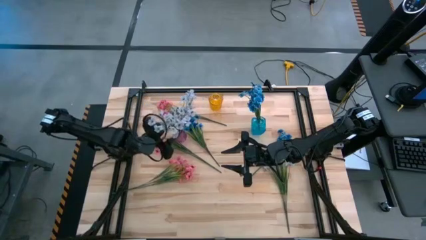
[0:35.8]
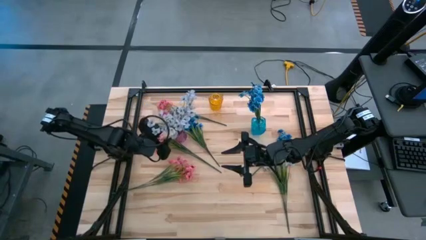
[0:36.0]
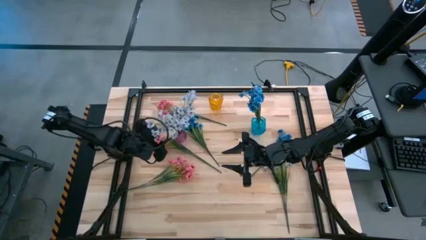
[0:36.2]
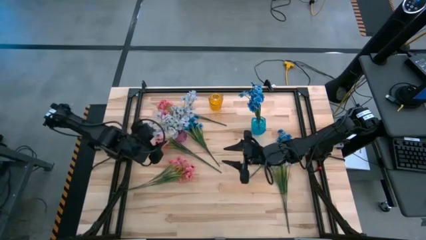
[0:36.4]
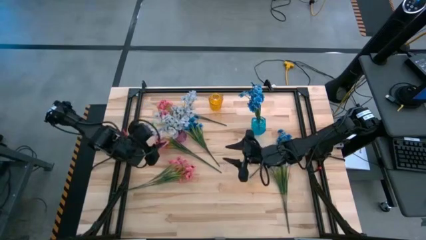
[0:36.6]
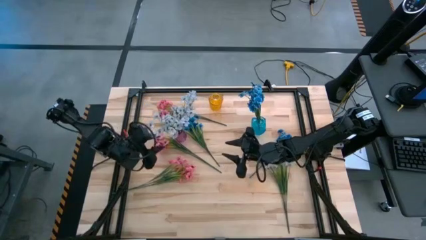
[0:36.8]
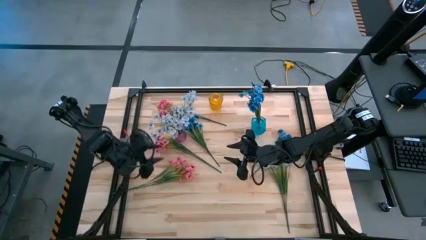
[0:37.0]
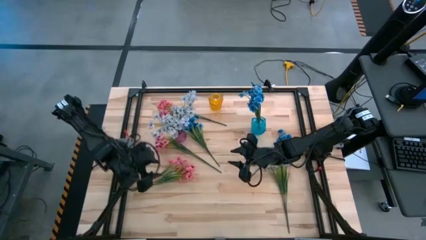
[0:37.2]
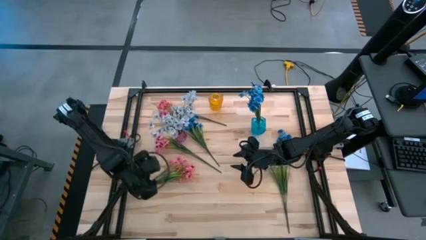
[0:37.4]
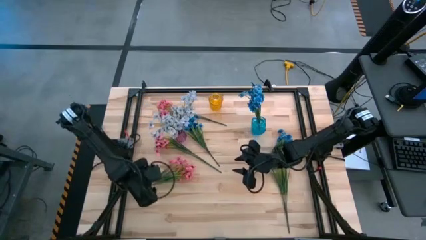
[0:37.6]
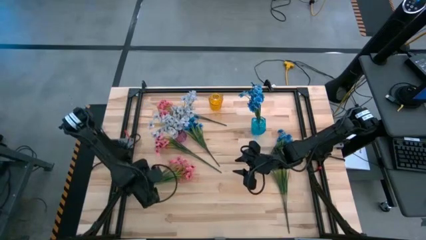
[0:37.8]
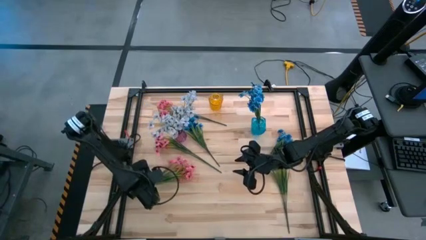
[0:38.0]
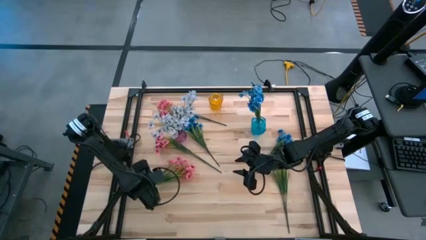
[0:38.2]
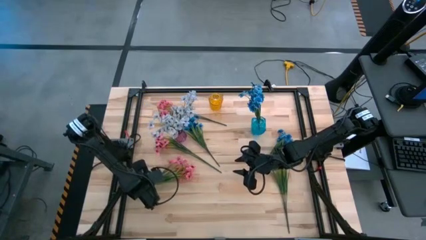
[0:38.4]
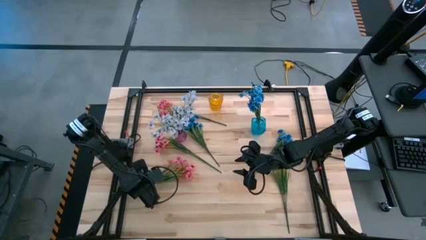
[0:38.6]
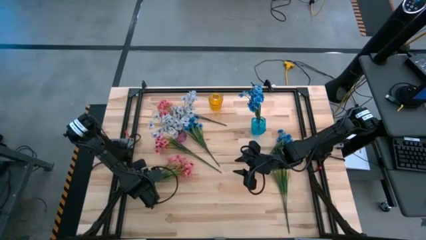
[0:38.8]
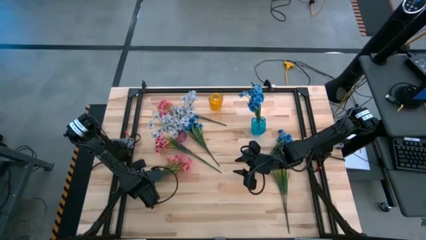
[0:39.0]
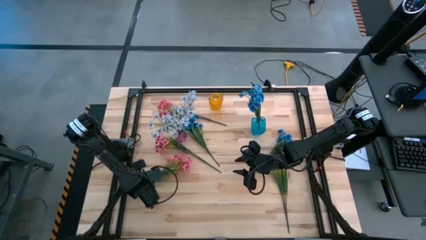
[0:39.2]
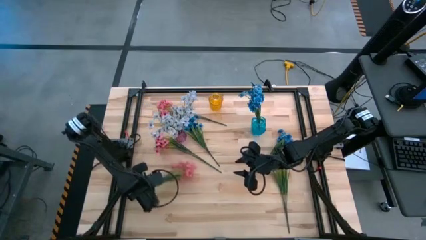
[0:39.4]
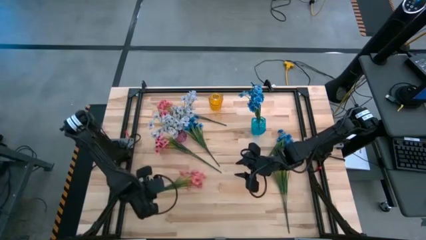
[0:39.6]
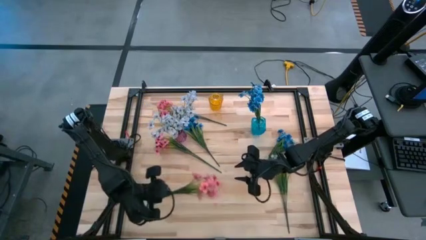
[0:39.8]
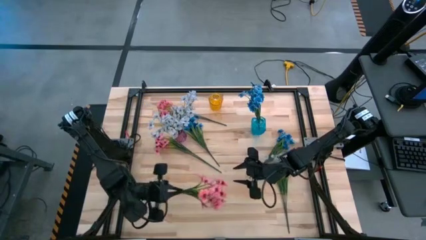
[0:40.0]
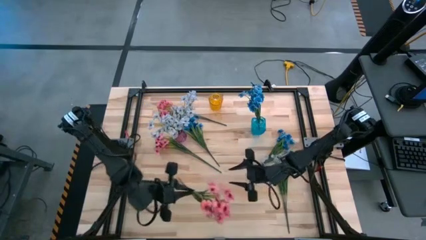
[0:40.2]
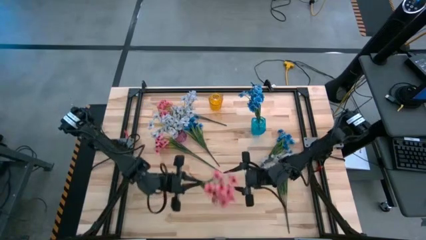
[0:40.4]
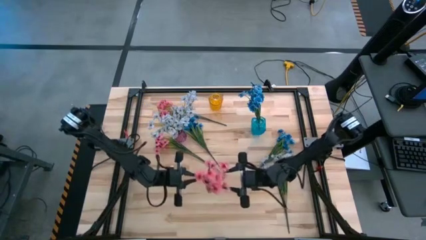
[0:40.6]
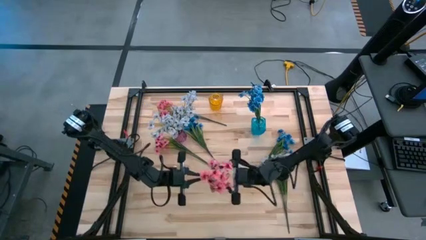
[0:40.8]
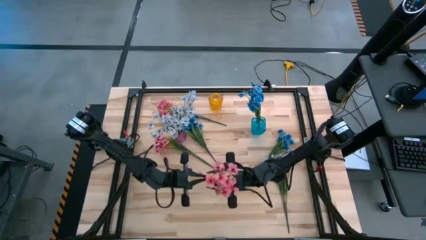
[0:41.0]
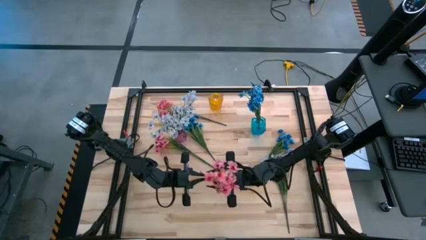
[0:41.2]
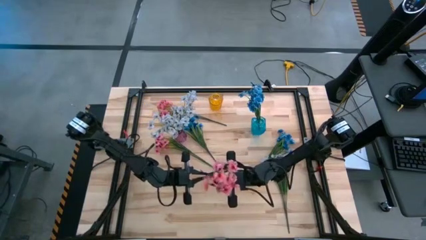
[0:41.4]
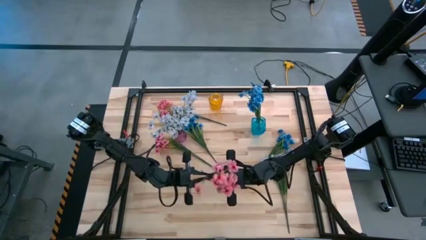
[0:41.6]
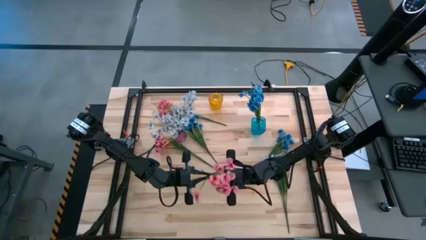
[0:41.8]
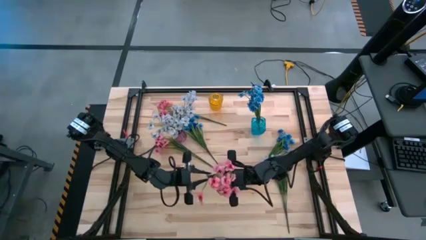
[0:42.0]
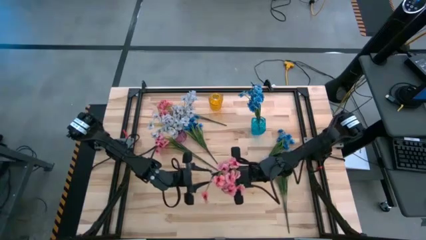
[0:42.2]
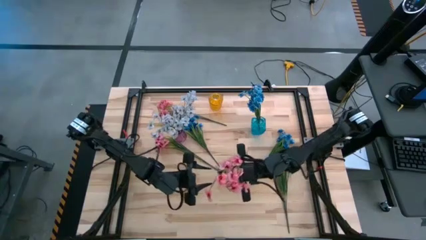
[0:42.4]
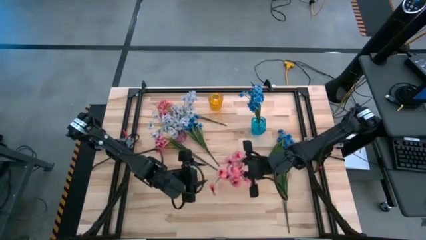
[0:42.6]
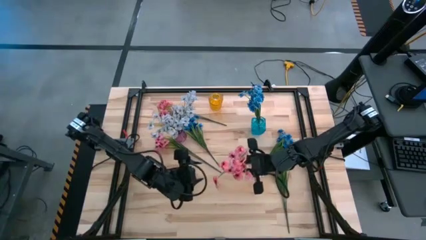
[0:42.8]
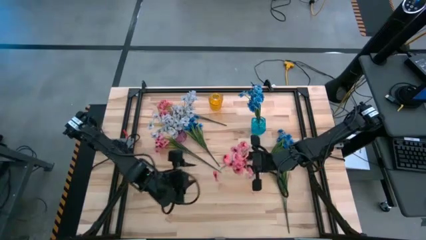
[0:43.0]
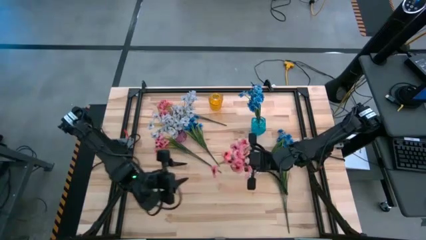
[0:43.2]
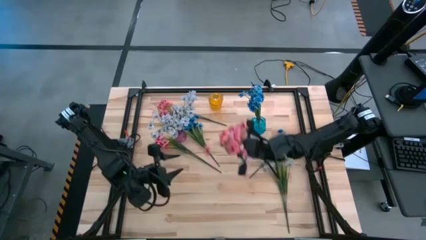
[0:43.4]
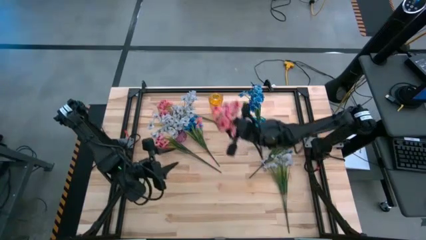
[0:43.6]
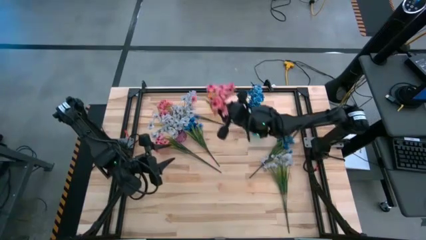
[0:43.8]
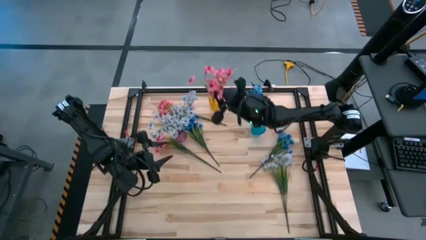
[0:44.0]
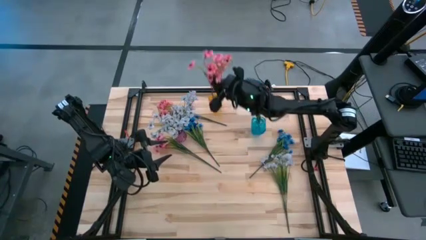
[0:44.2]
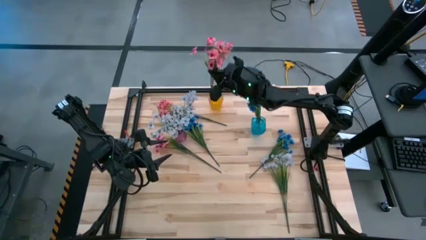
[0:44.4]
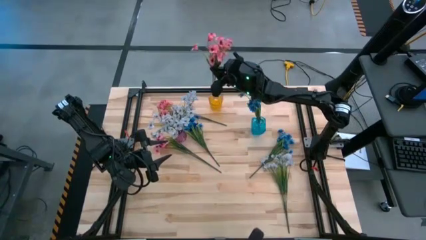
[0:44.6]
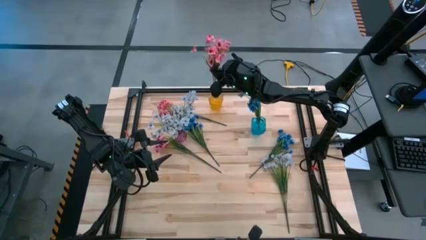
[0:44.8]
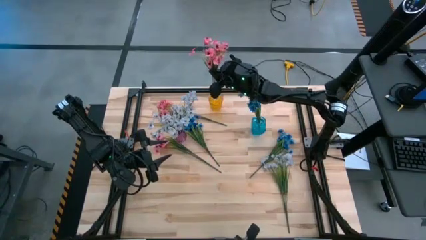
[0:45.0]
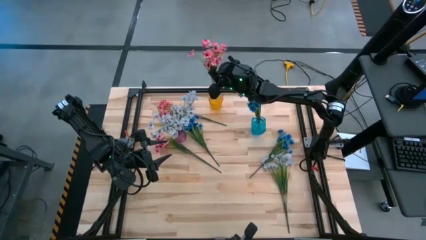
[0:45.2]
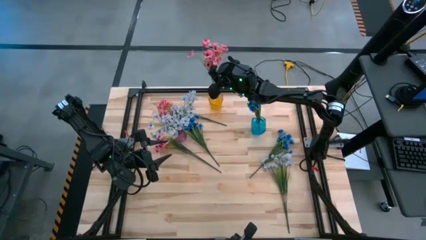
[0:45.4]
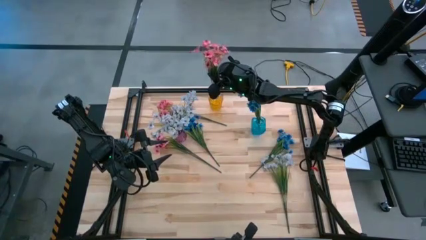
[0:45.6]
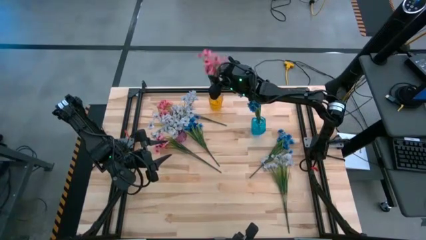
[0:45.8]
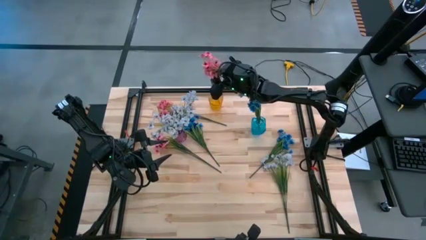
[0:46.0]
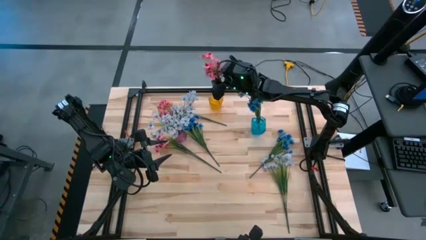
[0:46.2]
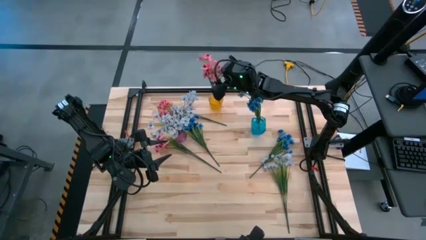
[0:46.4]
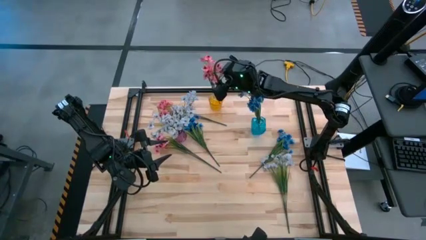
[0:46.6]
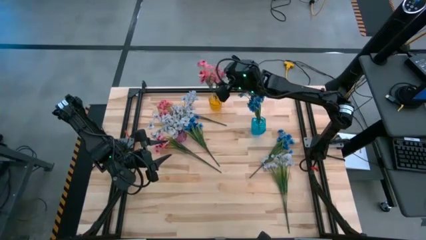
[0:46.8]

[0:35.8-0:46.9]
Task: Sort flowers into vase by color
Put the bottom pink flowers into the yellow vase
